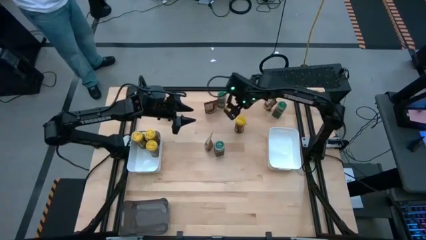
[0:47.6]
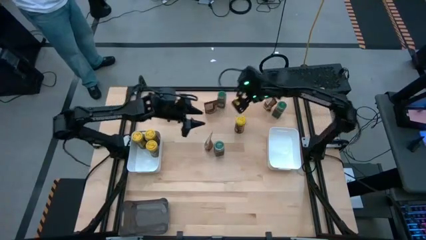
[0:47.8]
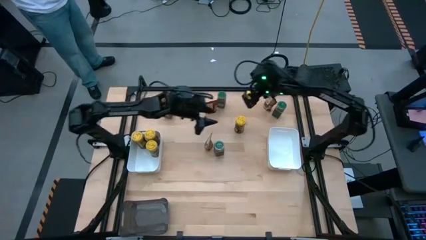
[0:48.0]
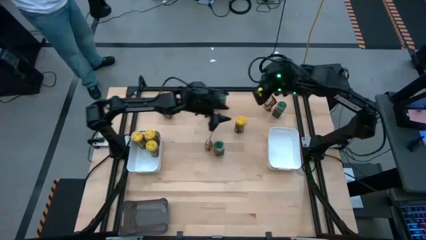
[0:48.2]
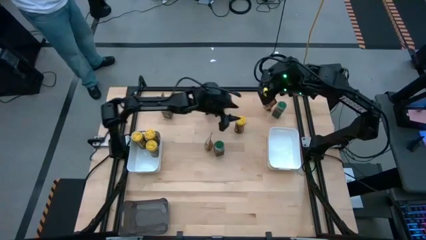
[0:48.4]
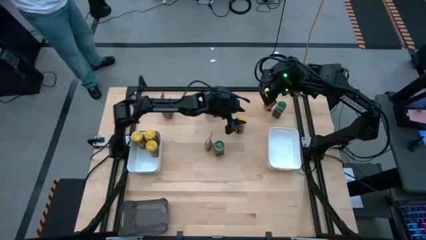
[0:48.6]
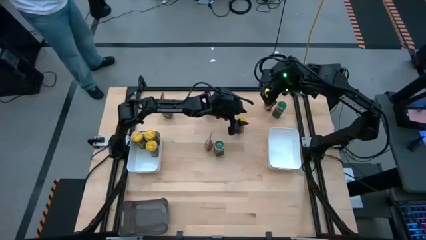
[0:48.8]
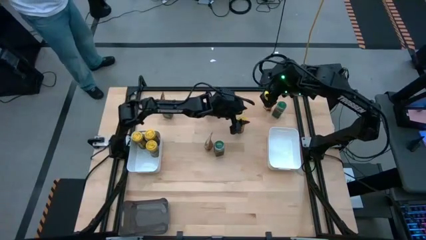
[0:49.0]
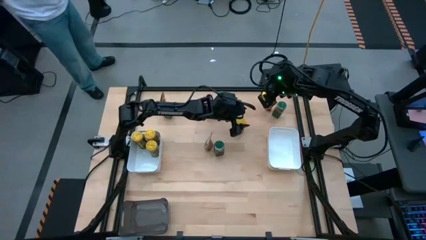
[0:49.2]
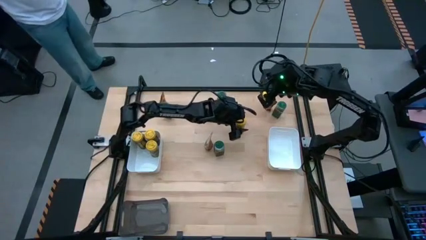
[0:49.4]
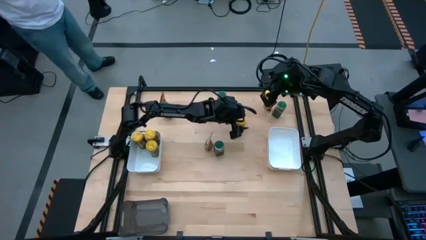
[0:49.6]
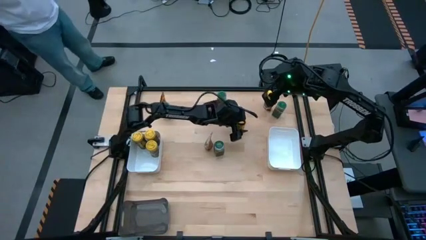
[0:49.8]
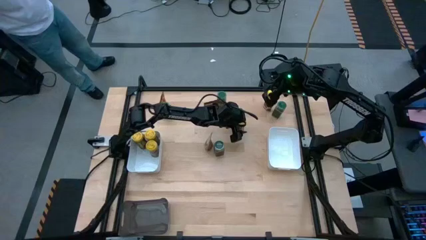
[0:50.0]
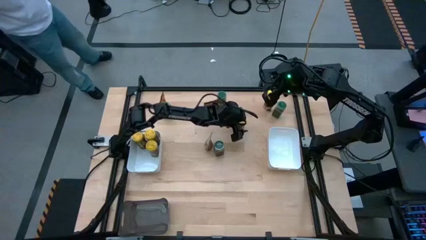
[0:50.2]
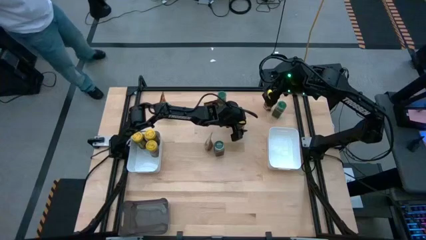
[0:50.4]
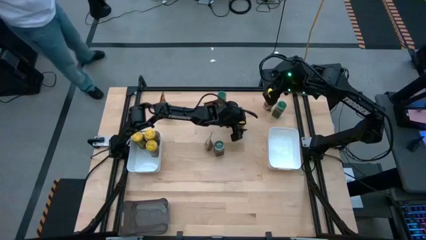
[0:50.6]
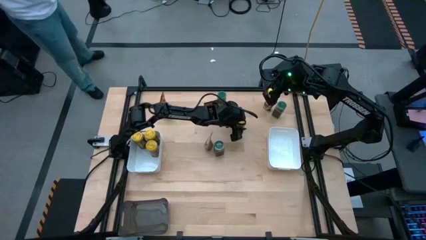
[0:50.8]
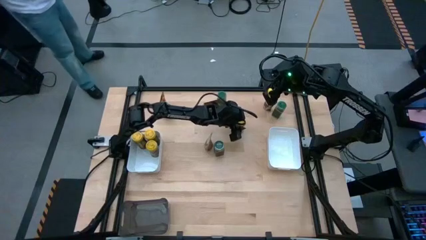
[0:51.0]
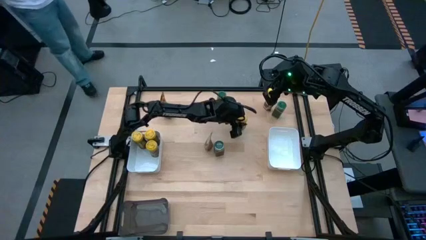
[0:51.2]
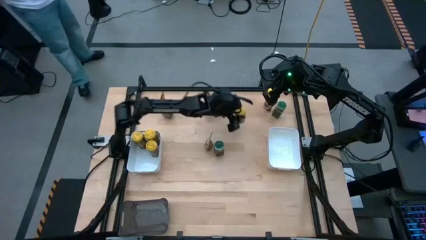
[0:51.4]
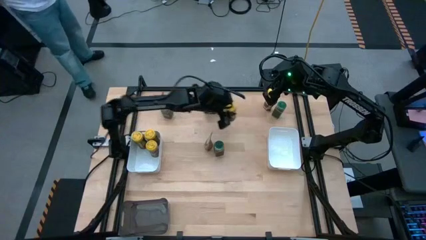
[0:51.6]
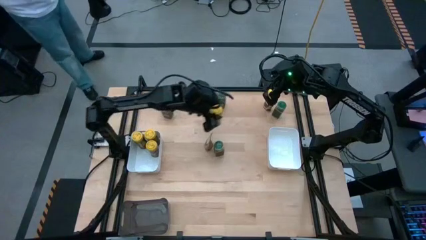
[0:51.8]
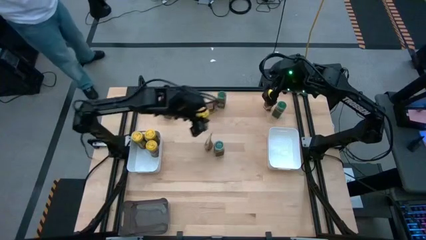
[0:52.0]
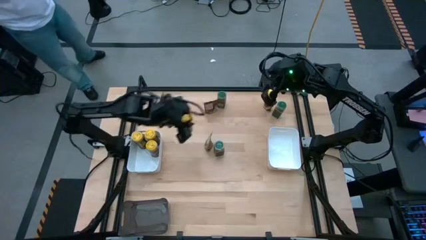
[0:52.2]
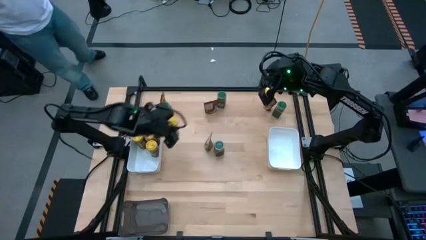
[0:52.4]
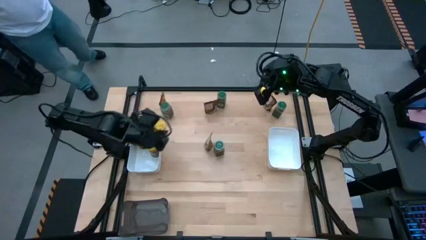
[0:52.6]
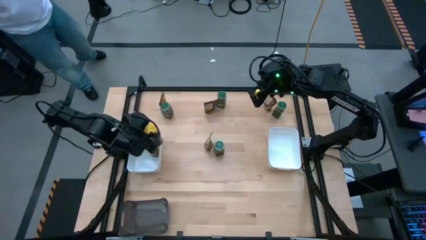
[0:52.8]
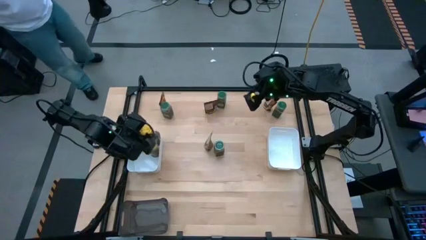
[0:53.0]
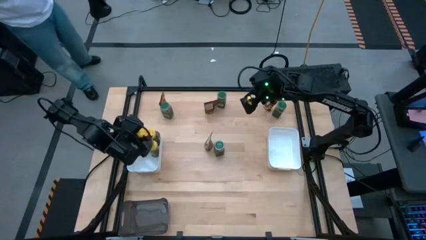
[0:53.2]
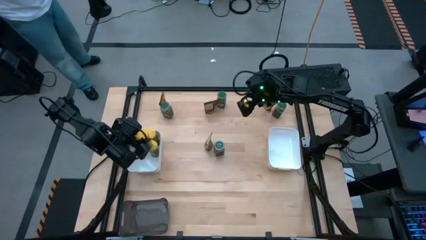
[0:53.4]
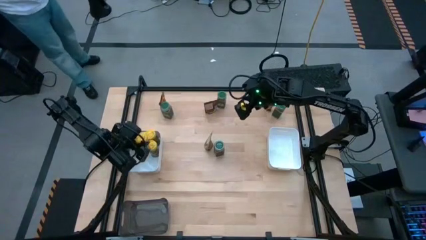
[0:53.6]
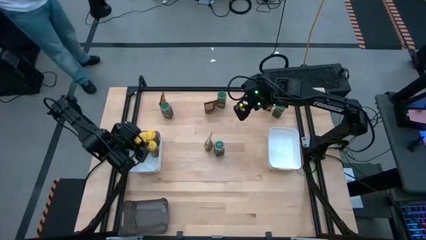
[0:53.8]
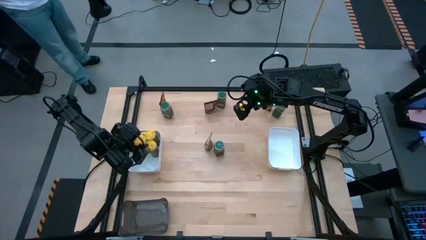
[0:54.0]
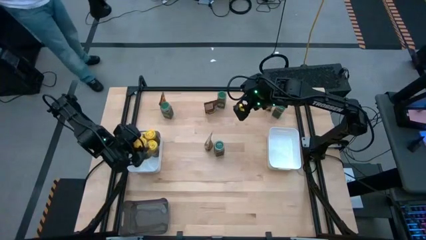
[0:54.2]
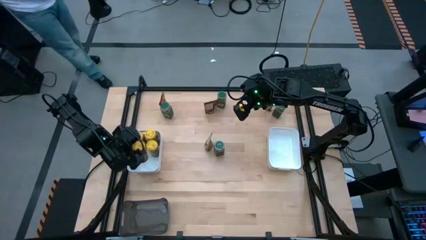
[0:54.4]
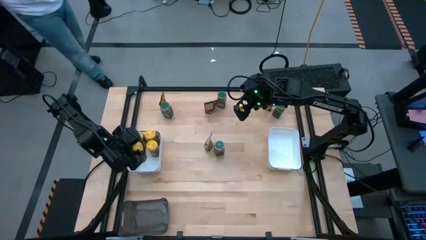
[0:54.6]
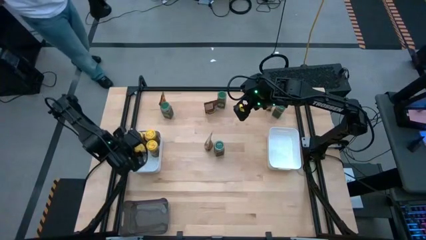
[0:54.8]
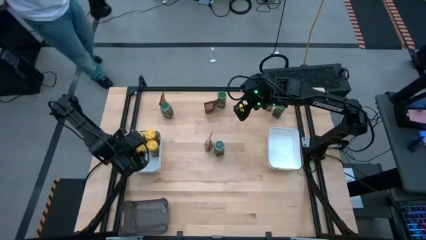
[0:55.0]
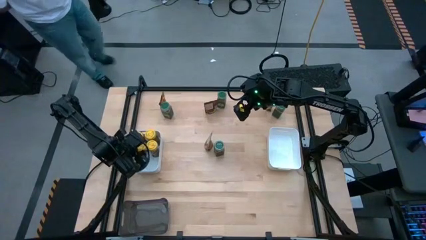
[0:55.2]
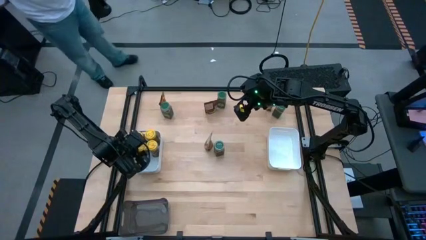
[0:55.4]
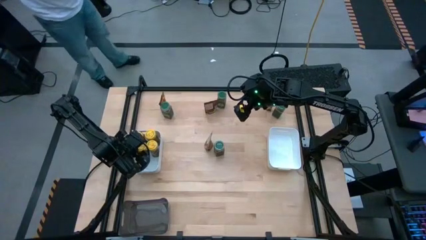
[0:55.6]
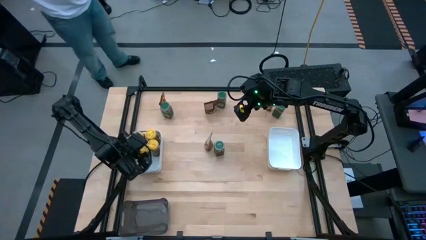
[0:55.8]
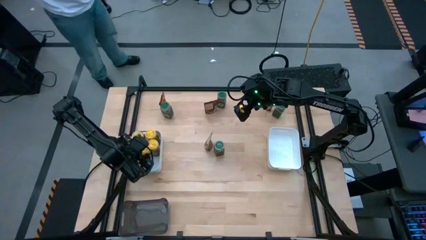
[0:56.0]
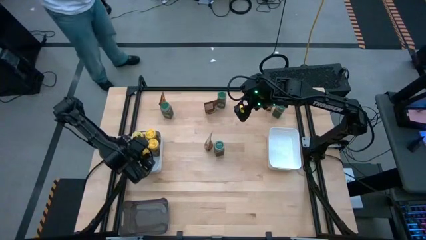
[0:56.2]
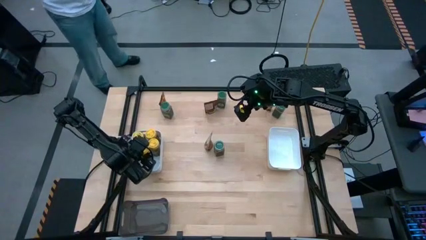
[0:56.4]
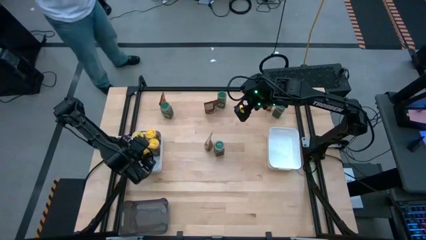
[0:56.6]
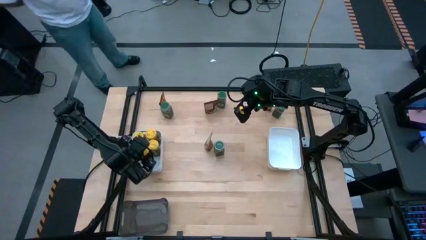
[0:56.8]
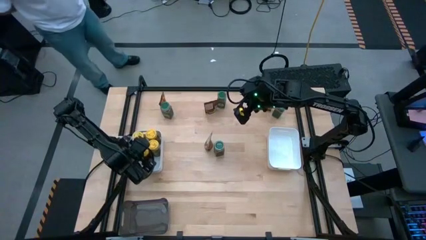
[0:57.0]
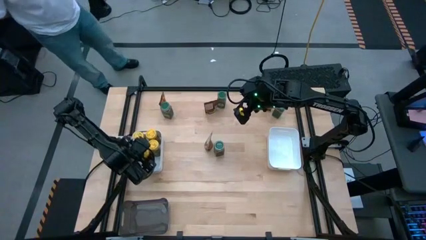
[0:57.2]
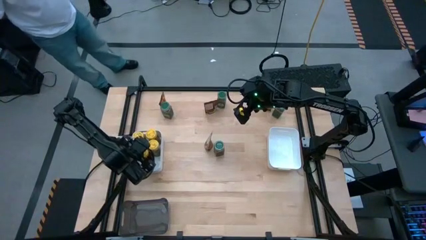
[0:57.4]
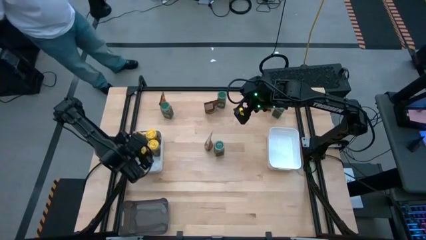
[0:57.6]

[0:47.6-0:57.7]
Task: Sort spices by type
Put the yellow seasoning bottle into the left white bin

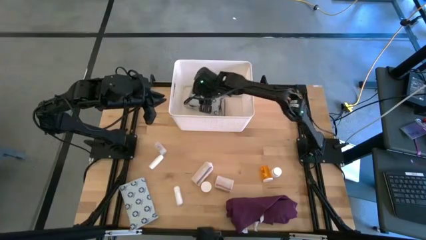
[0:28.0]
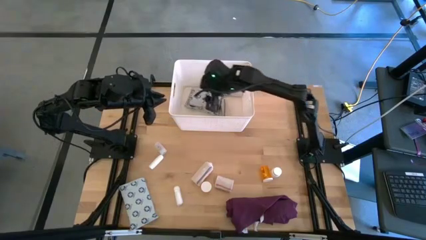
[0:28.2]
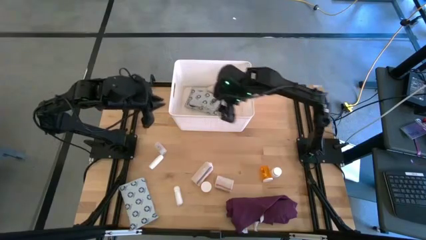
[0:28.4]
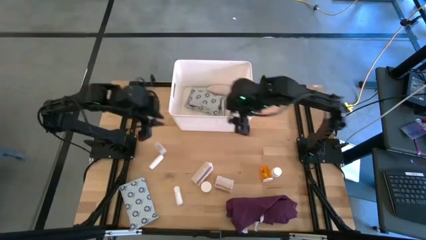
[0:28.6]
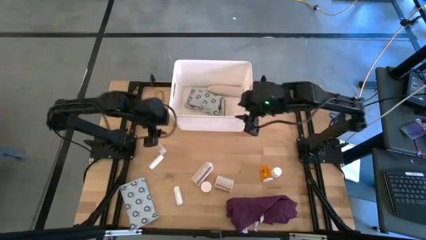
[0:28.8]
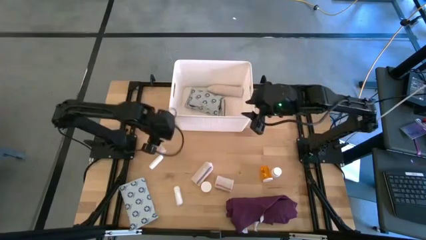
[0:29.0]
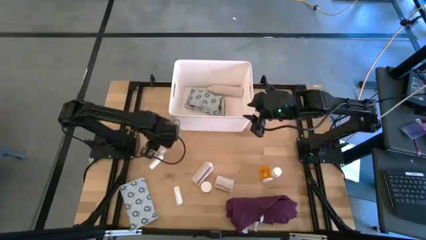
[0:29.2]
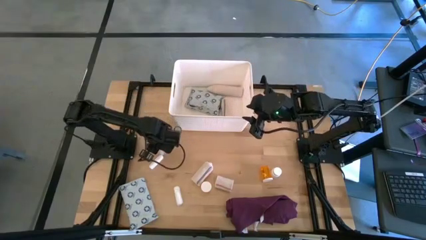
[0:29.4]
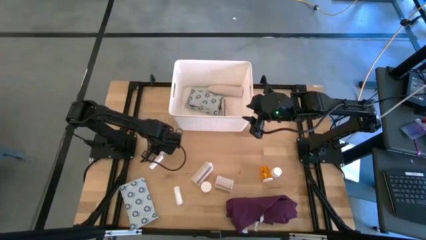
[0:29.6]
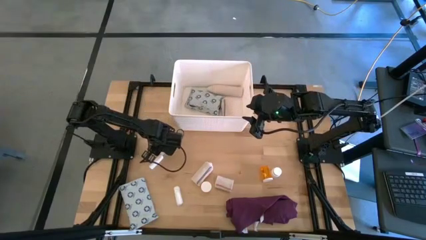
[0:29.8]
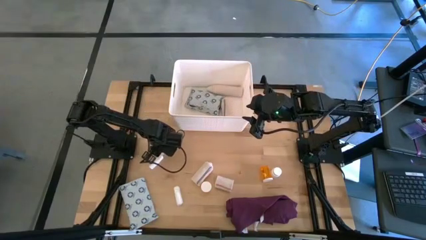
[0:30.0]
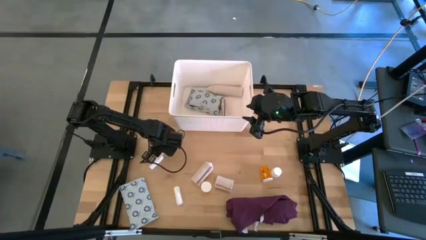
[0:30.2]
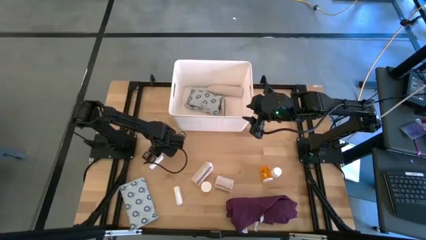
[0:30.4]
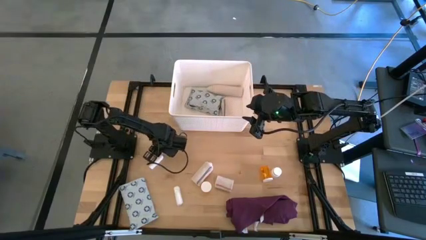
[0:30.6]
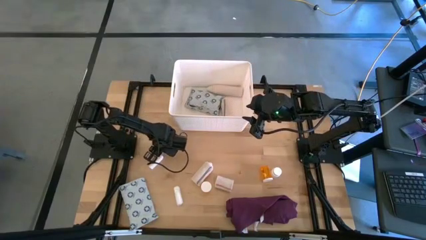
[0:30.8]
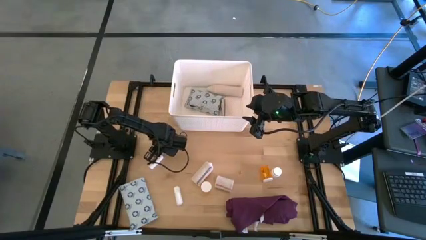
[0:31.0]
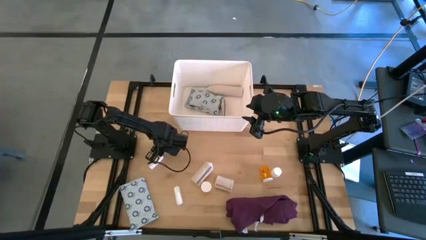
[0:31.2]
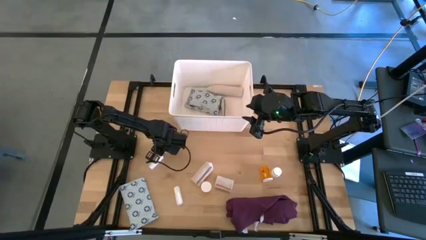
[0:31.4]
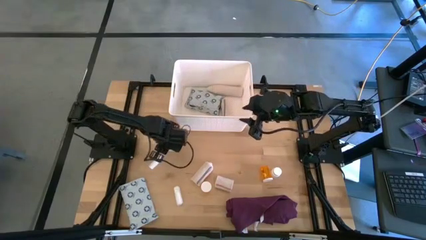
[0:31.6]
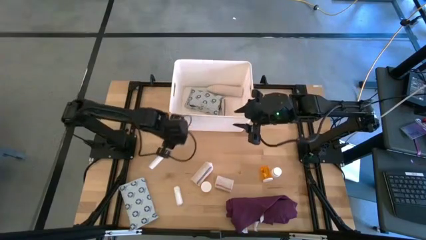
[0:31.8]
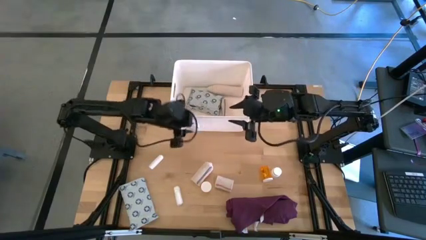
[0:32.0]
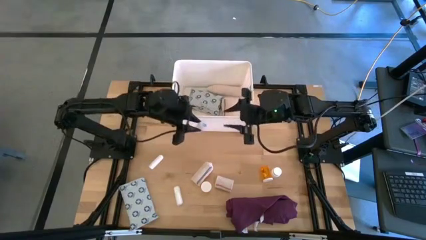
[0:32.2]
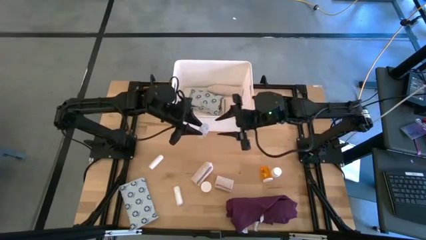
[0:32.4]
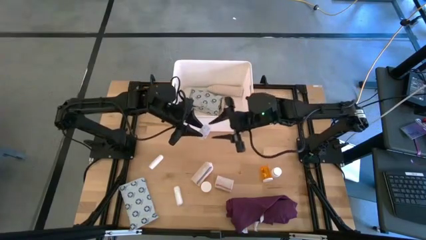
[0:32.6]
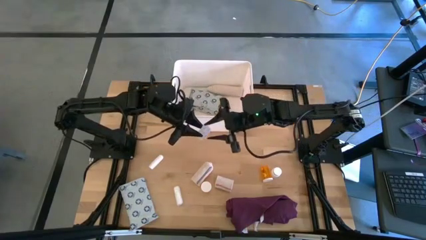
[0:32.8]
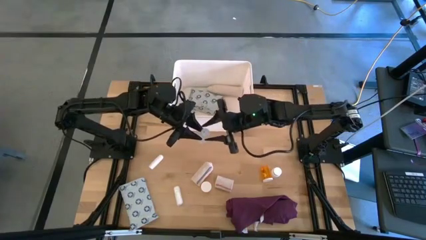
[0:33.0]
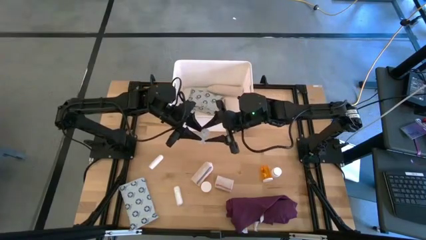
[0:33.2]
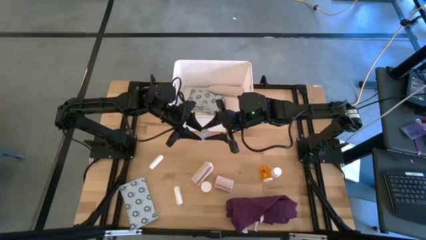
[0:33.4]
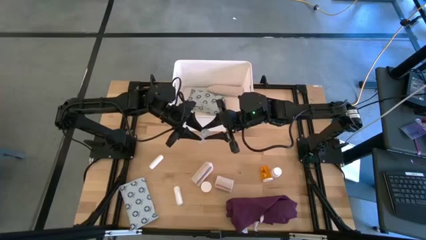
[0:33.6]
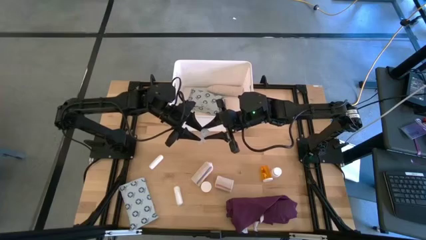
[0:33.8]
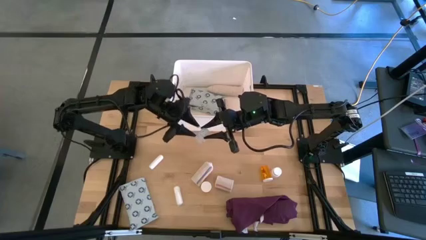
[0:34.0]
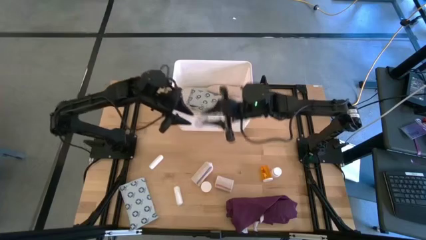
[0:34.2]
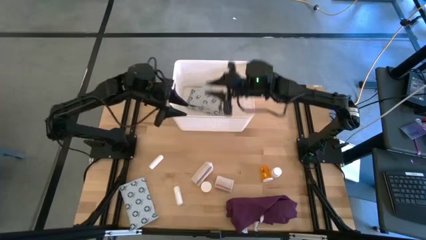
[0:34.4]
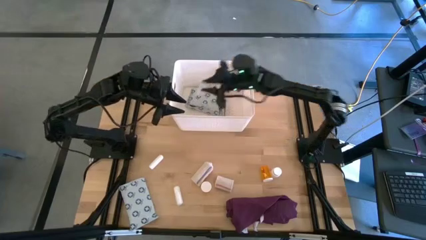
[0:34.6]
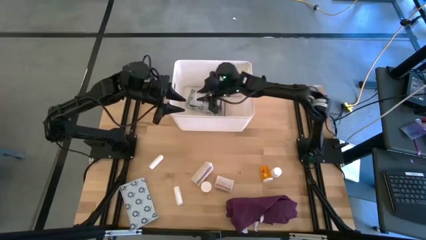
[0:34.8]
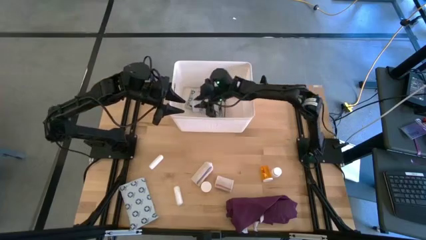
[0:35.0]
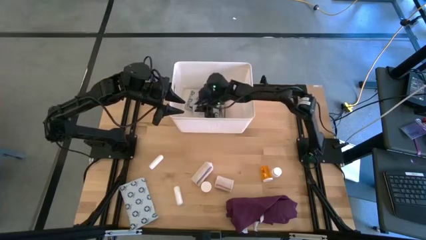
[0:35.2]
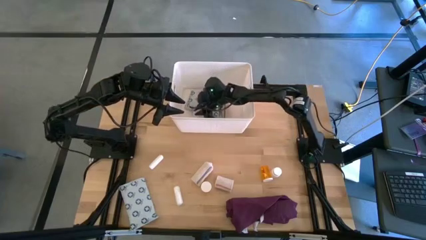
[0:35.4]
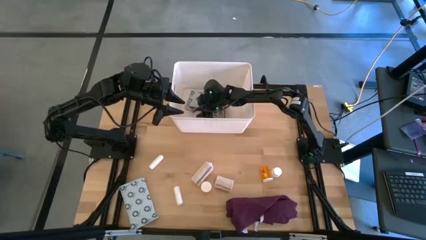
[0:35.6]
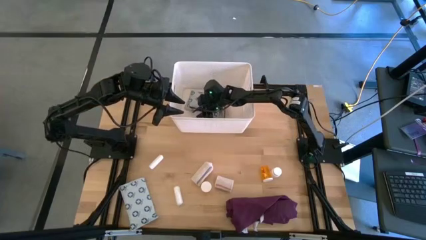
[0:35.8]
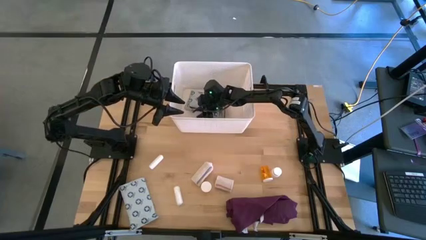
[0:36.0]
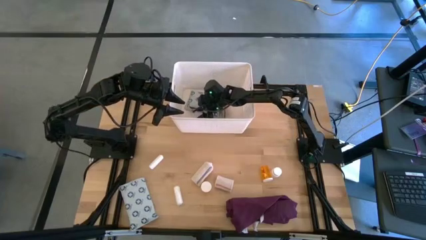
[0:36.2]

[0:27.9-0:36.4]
Task: Pick & place medical supplies in basket/bin
Put the transparent pill bottle into the white bin
